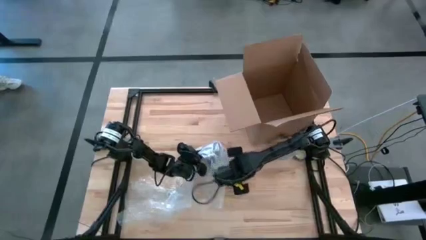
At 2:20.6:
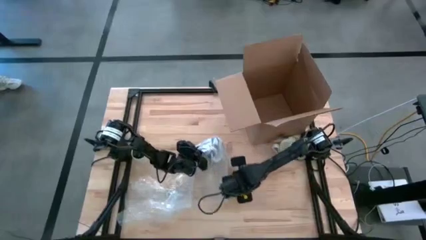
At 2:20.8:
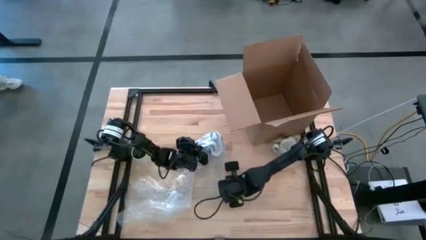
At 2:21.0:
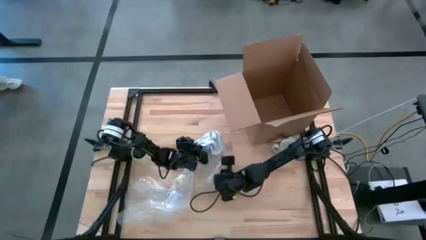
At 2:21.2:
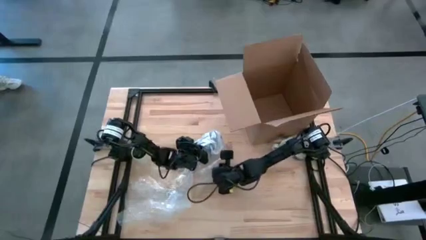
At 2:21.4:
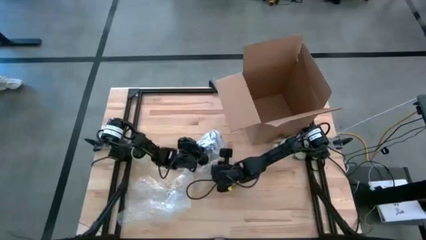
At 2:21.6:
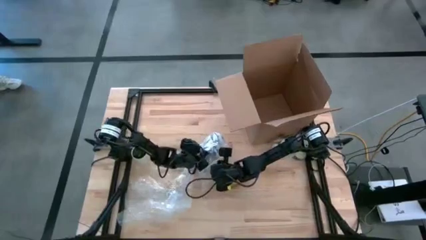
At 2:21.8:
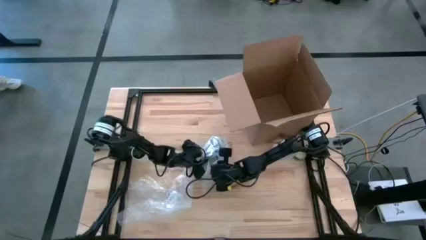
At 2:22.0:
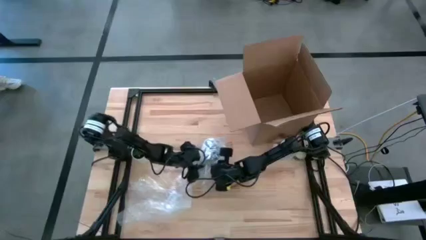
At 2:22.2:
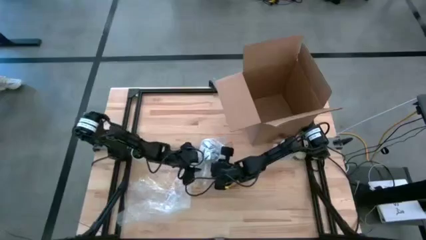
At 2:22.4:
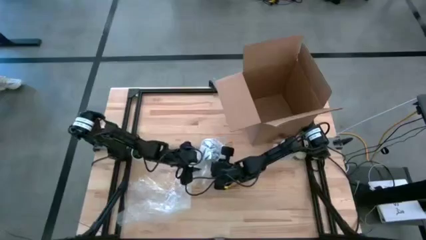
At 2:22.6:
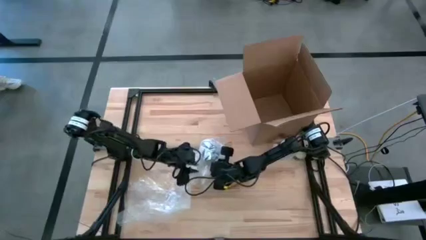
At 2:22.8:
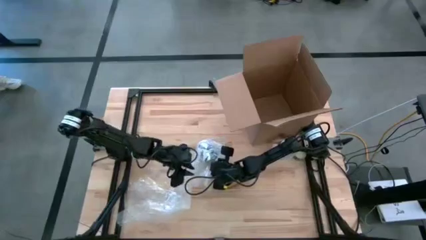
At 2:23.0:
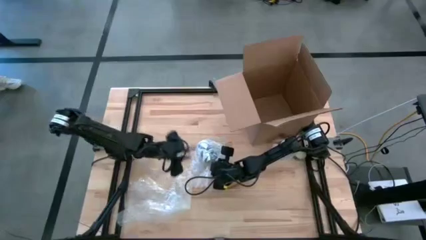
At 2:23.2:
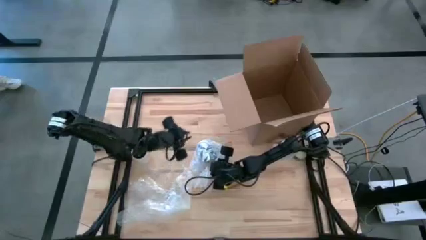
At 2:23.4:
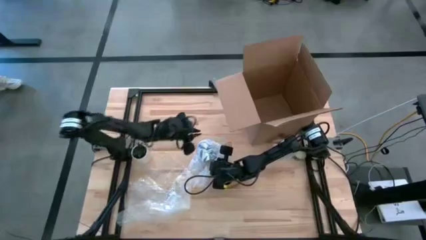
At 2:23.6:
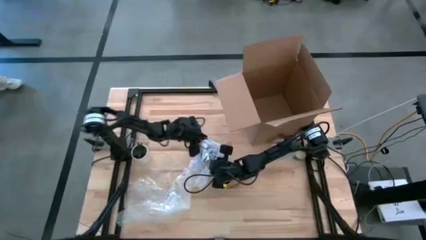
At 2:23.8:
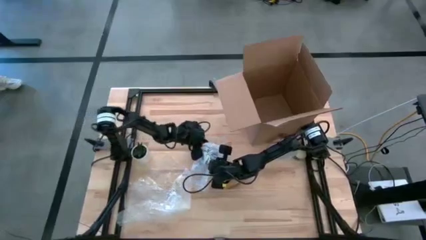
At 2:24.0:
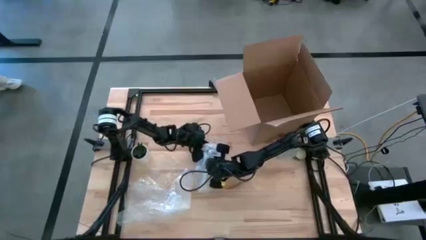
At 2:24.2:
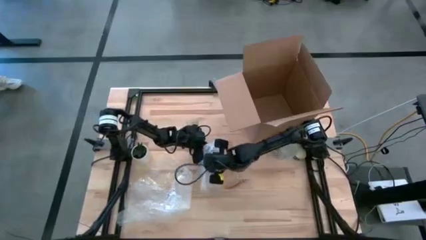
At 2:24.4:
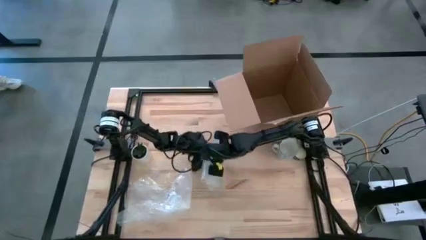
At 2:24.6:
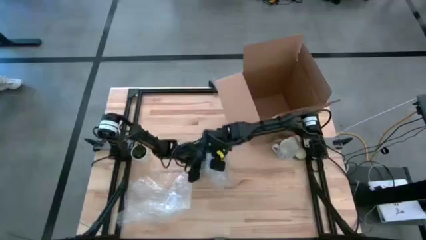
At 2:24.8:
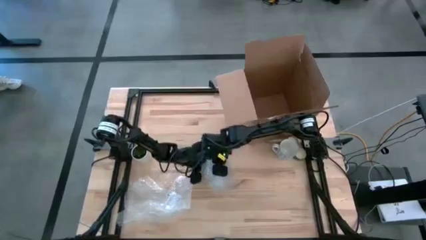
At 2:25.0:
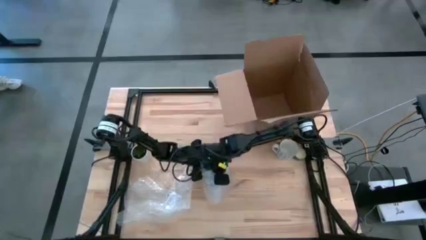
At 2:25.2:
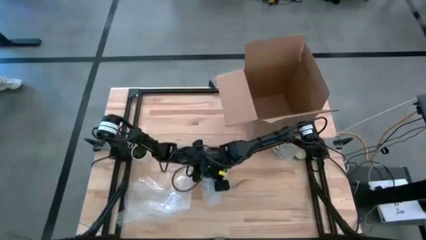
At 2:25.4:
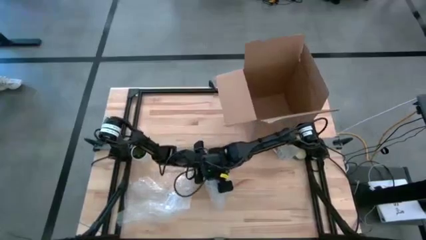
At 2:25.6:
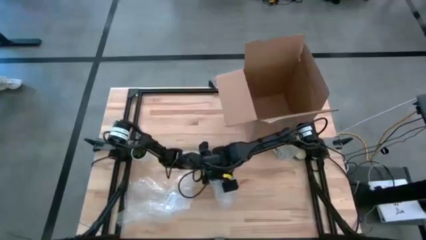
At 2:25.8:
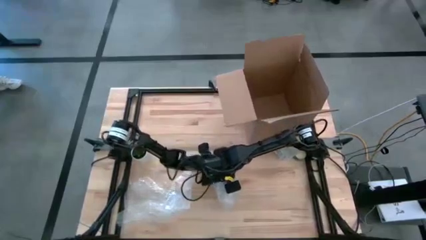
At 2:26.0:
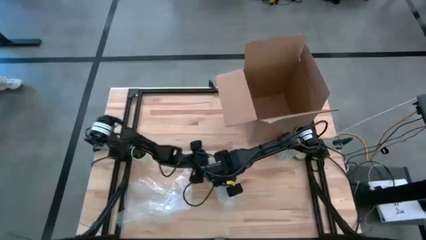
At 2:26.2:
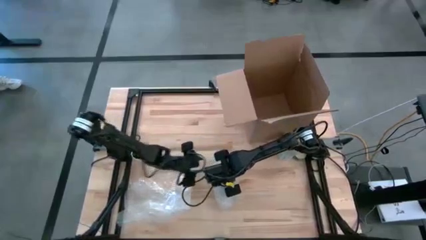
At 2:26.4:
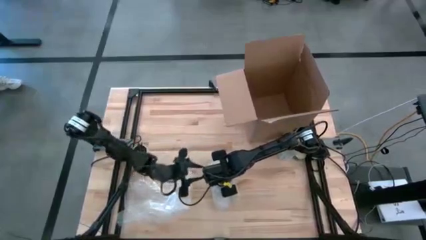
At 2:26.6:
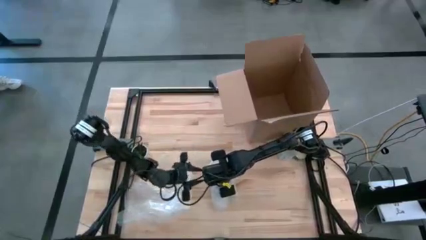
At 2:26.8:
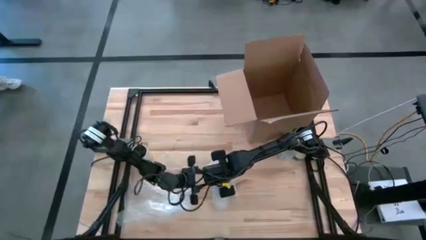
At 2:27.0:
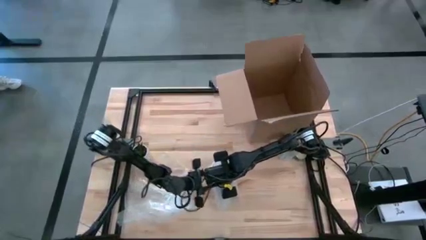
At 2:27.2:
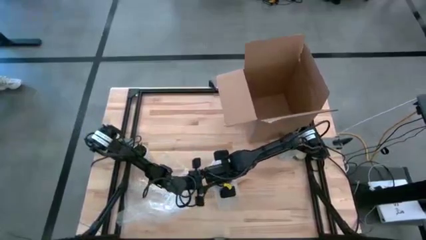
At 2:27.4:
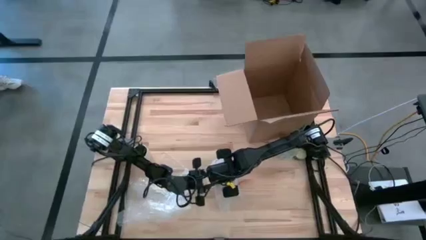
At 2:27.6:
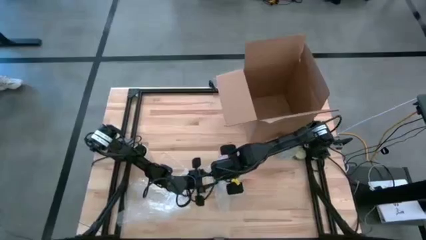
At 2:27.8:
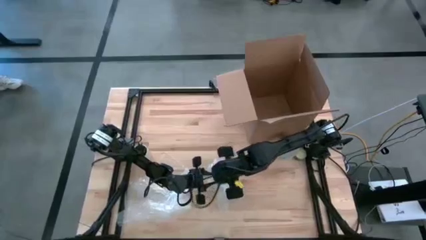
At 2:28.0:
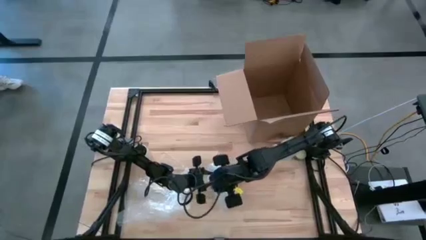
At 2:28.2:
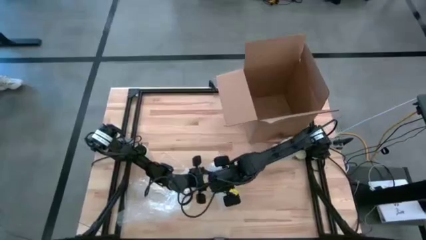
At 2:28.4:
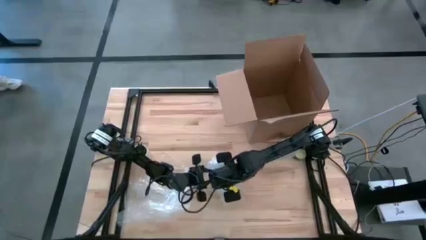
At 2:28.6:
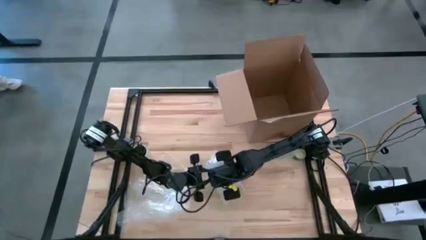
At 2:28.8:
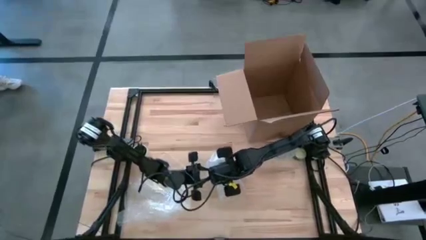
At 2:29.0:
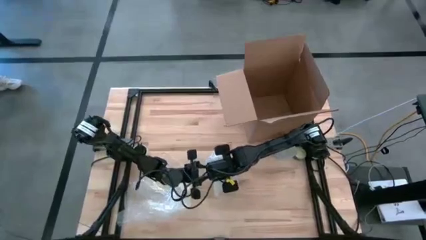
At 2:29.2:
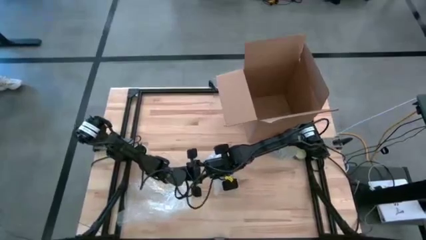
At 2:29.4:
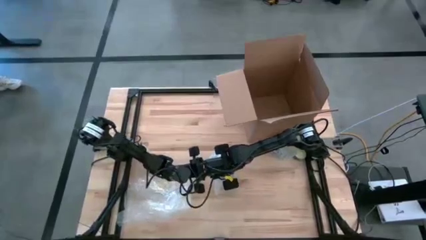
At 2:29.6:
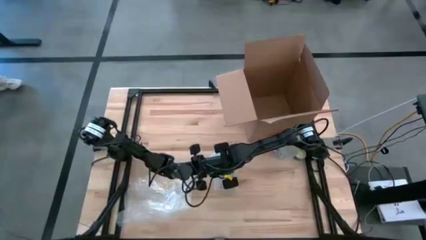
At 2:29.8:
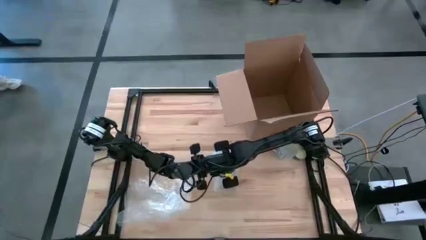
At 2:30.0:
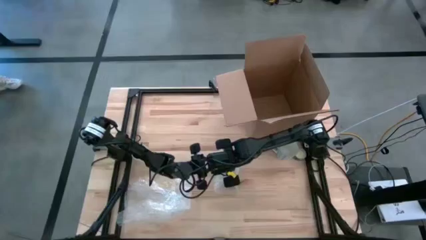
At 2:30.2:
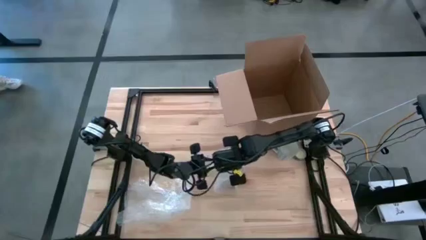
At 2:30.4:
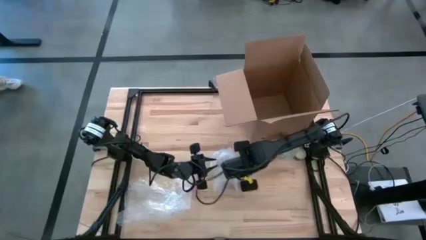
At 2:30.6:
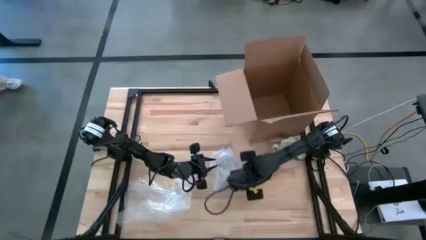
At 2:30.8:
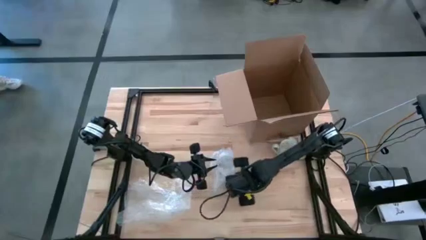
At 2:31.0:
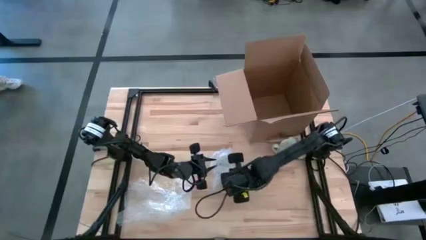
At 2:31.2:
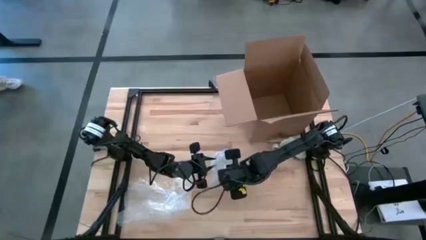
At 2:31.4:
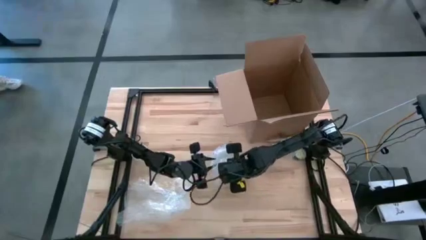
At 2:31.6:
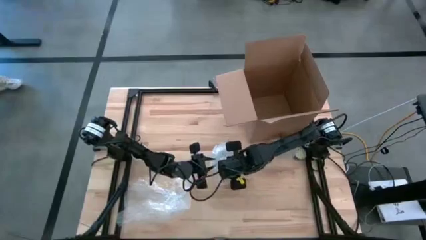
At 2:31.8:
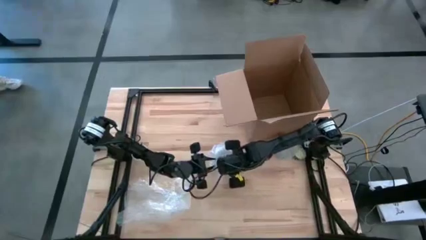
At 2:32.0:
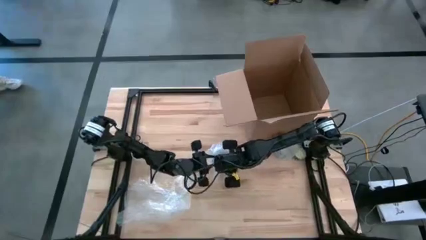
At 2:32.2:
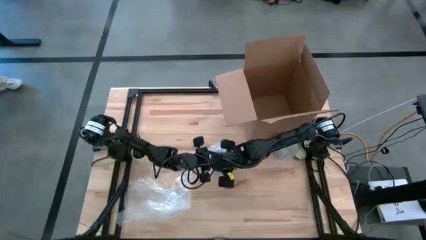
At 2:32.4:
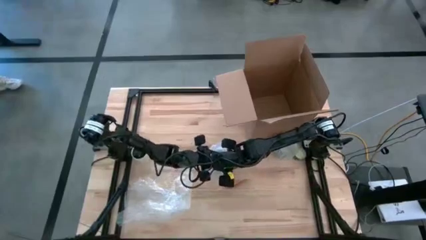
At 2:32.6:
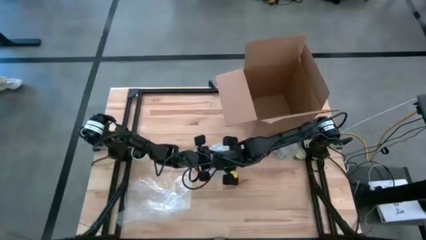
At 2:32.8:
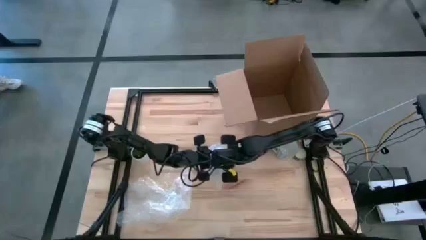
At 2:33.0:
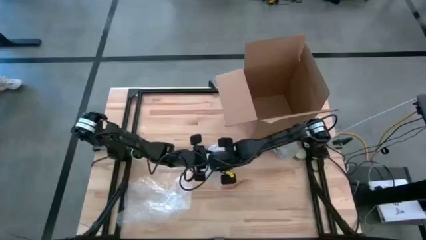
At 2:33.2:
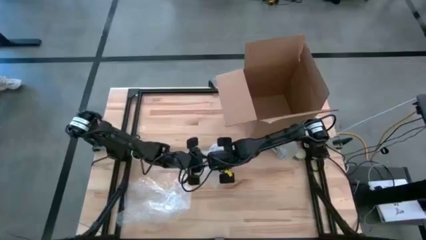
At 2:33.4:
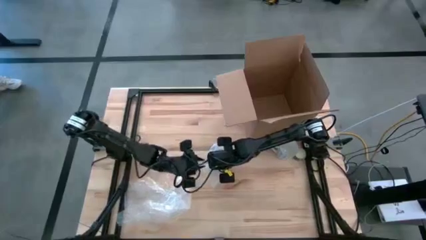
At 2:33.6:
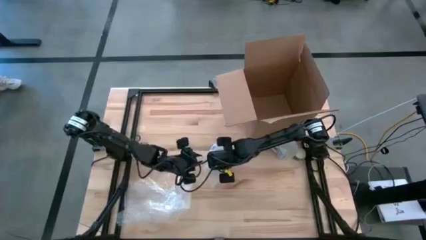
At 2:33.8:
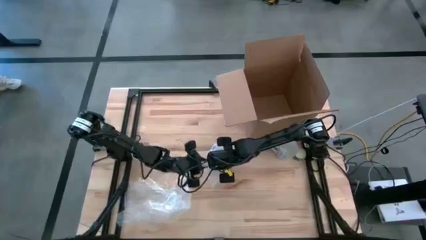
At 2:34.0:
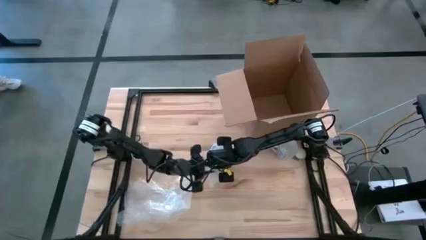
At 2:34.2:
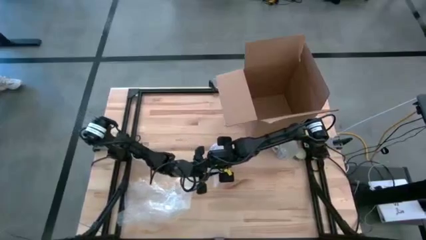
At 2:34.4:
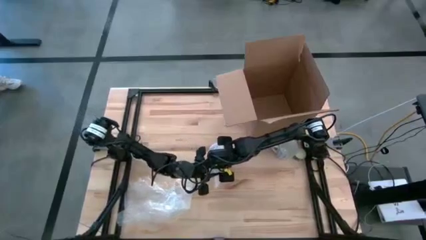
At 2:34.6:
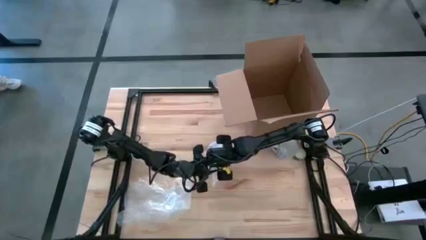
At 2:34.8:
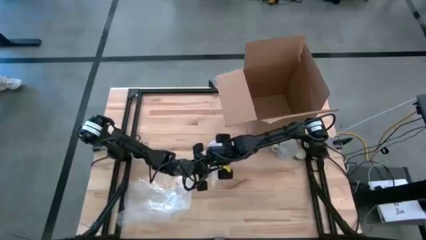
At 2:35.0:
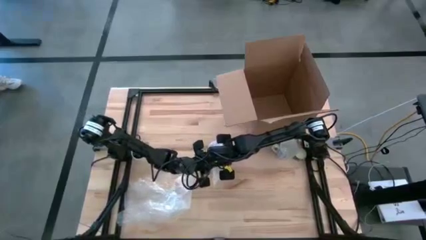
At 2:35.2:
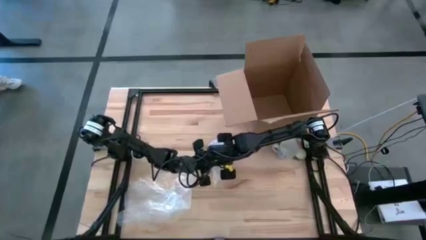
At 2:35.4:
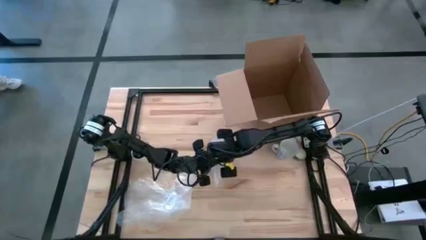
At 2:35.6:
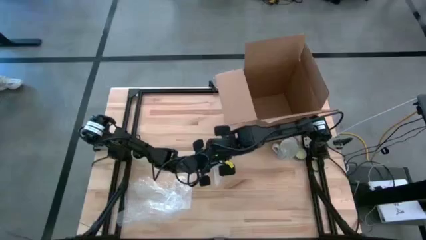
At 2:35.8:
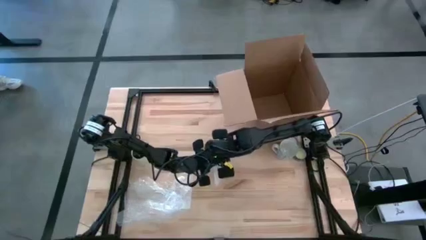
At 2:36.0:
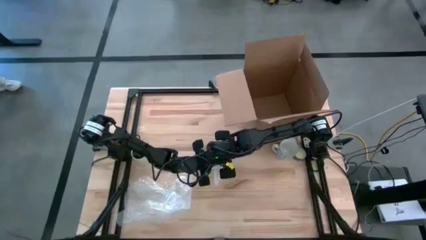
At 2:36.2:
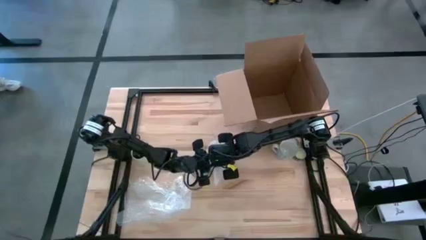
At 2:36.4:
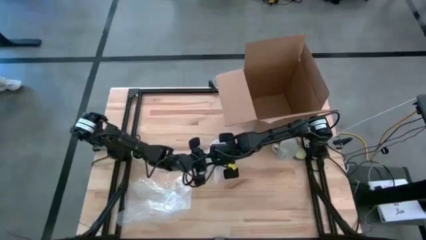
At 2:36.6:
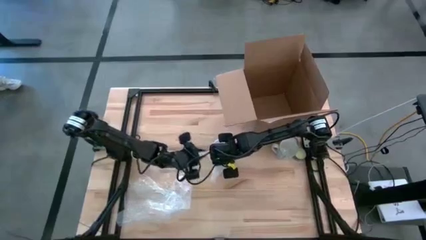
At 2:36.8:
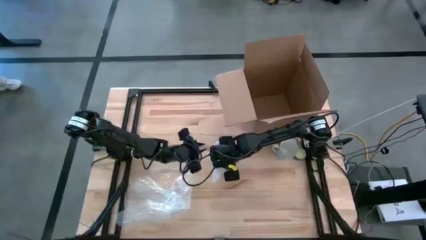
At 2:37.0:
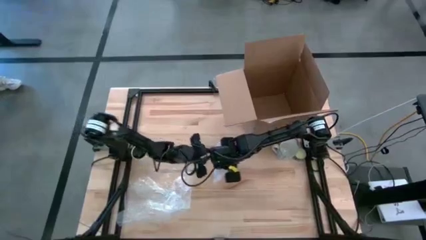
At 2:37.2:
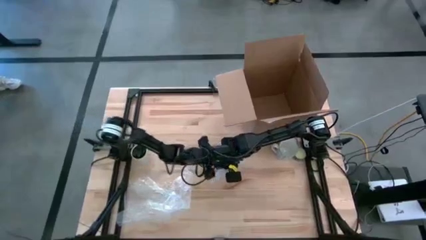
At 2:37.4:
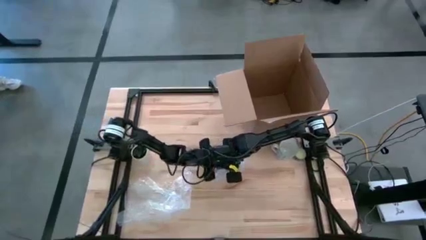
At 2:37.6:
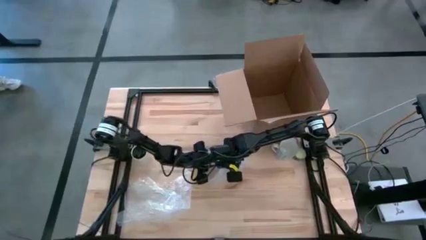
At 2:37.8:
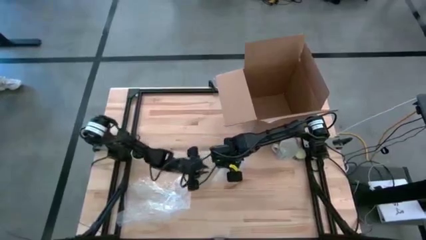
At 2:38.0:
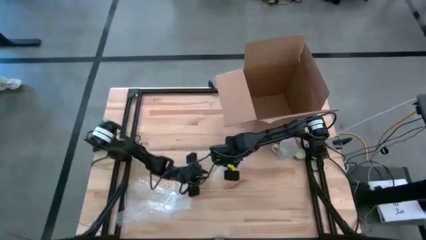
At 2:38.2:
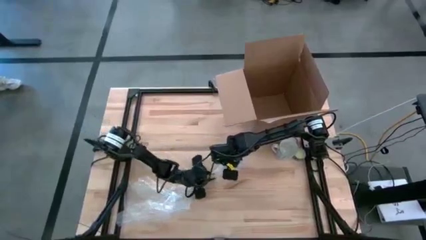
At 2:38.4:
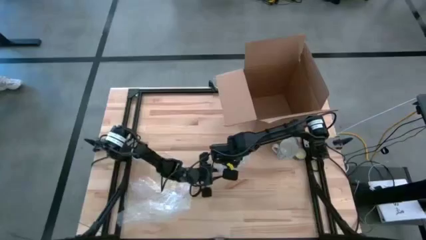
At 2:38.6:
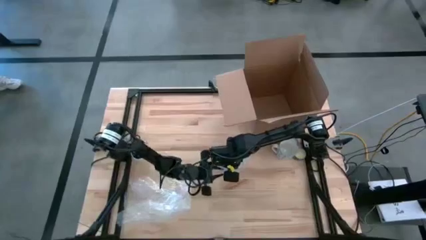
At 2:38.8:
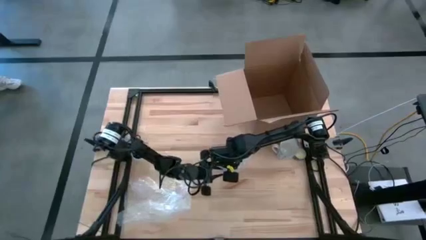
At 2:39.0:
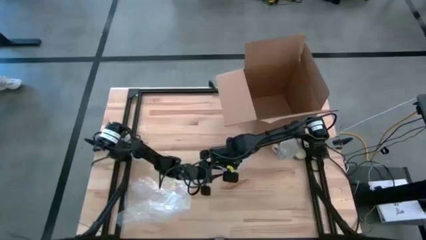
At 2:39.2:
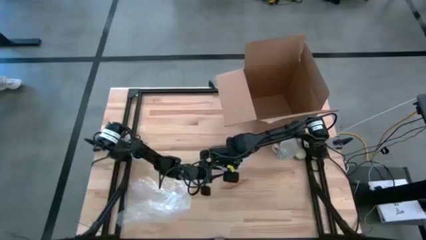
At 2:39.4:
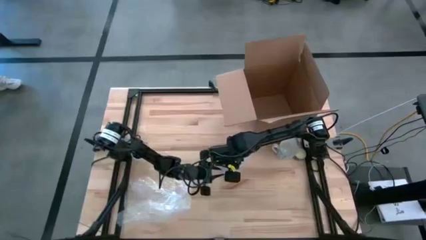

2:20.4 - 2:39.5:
Task: wrap mug
Wrap the blue mug with the right bubble wrap
